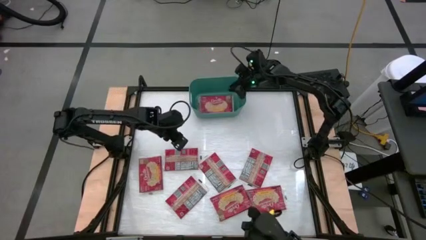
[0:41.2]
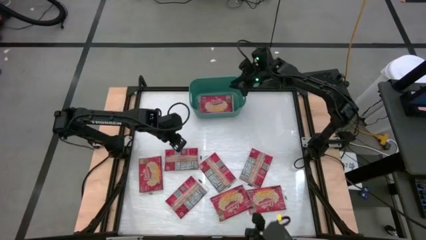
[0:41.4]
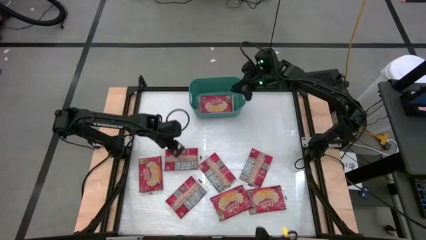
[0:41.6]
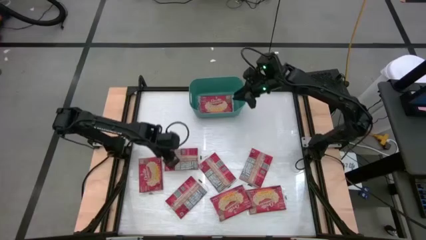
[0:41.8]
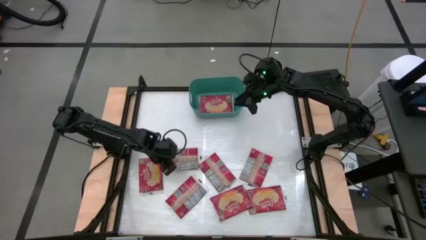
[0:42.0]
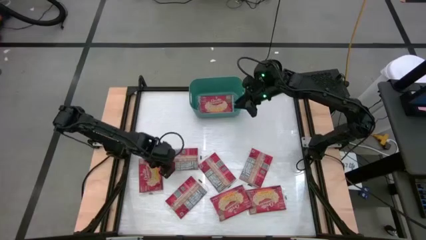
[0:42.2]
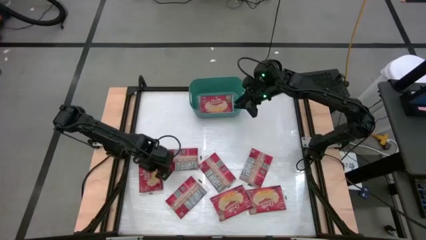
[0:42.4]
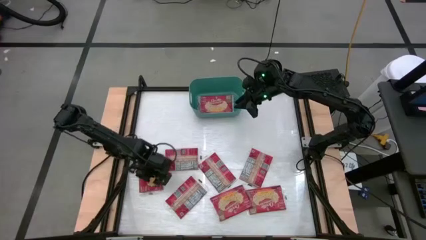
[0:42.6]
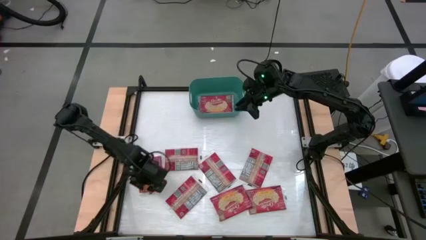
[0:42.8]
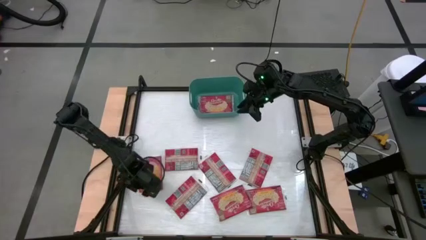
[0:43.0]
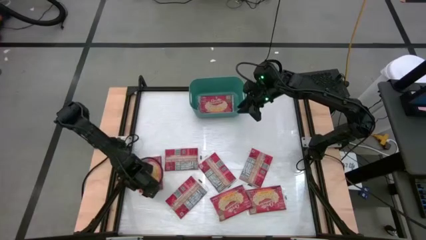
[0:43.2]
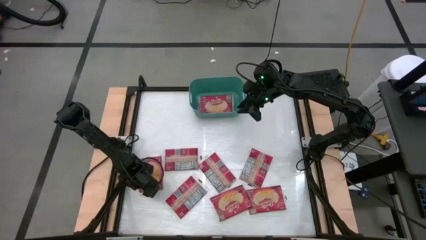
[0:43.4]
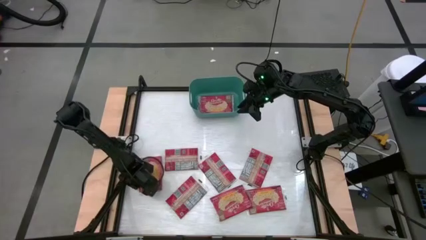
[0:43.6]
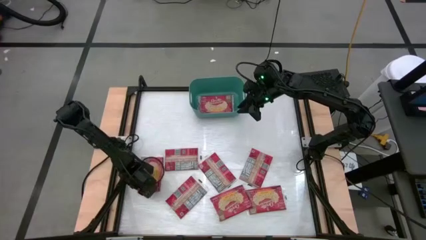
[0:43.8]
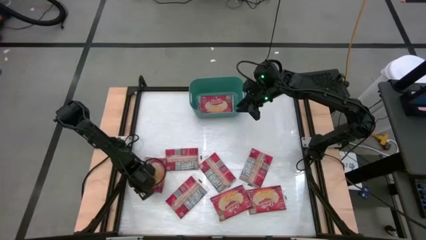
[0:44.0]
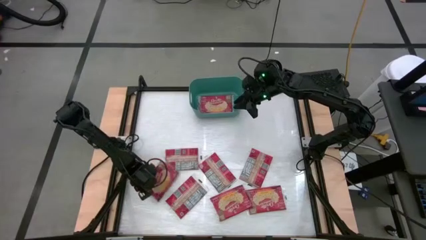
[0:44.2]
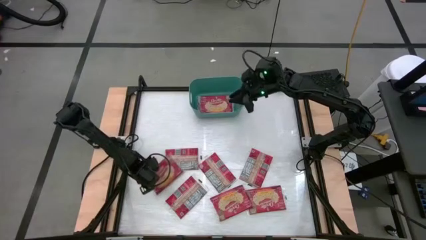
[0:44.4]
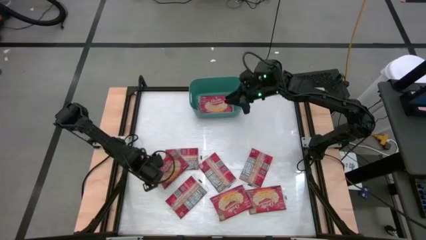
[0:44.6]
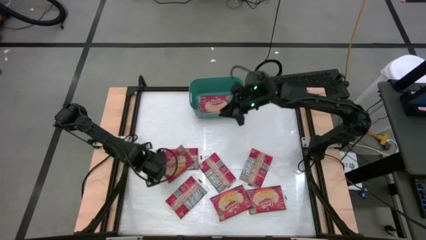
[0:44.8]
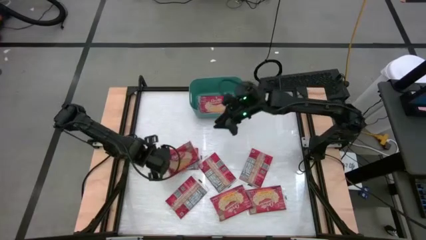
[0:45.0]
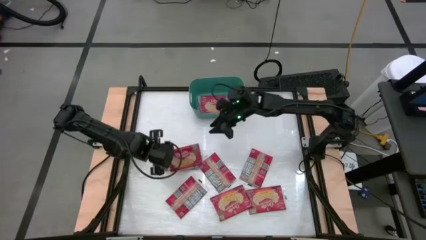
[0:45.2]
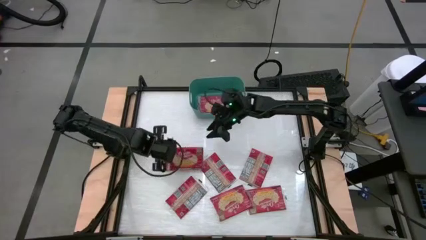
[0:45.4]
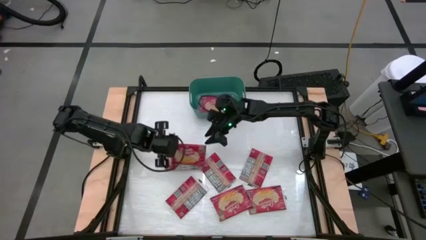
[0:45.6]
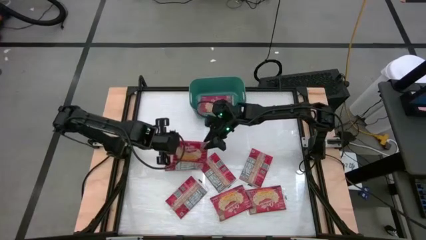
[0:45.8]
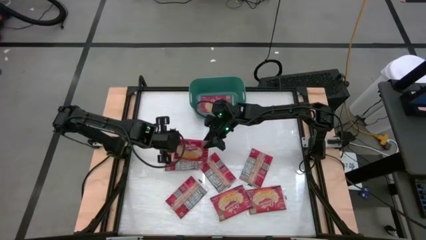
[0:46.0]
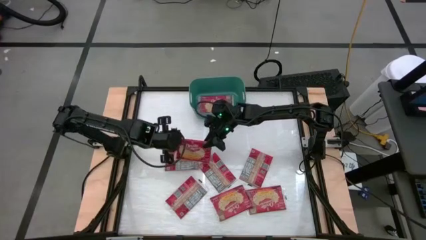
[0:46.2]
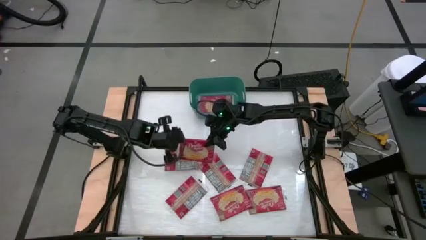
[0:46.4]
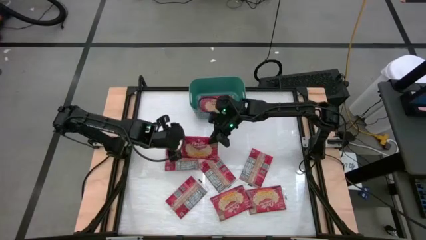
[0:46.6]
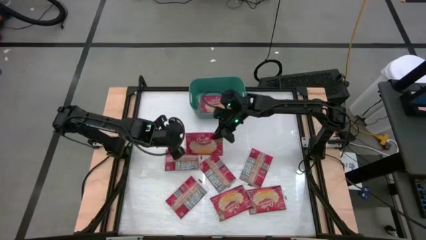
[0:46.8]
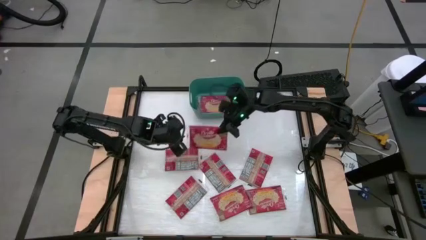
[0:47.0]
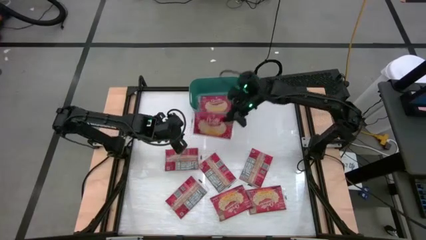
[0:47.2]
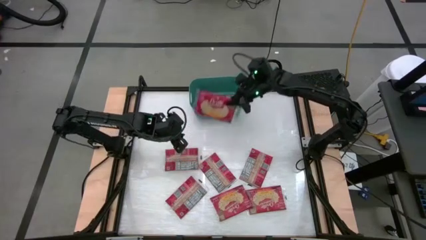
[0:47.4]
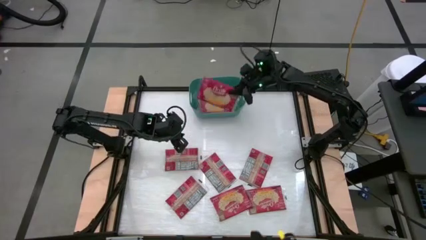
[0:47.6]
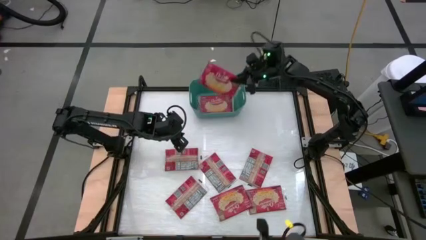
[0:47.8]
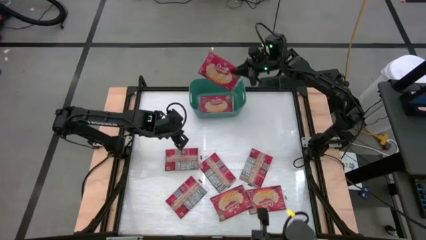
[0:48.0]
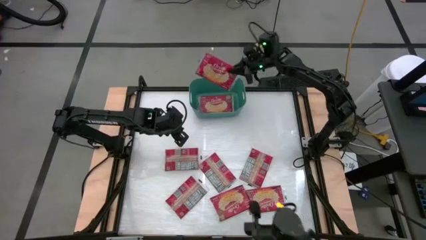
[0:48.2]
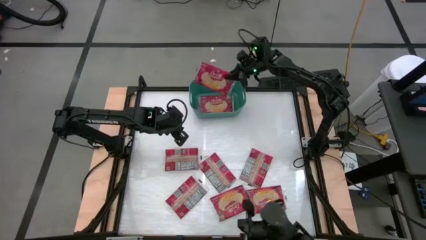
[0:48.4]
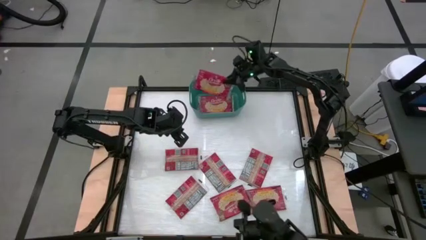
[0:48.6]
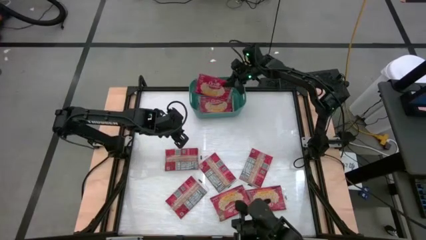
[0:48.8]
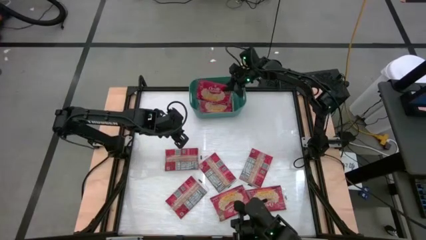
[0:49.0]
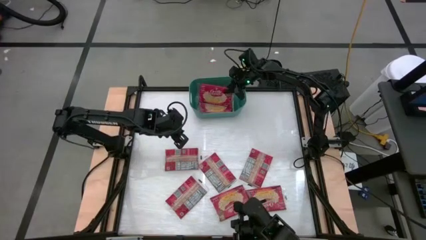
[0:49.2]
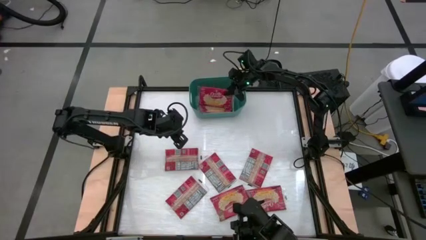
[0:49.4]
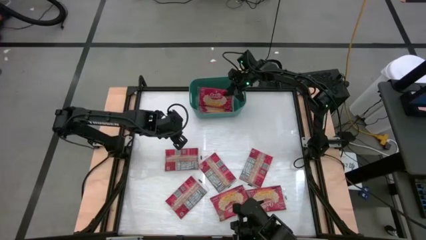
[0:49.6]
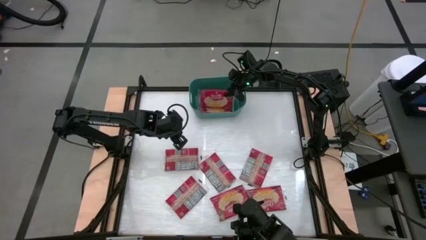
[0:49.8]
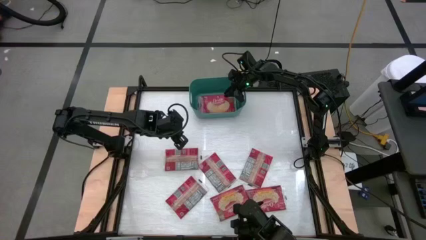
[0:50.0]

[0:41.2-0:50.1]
Task: Sort popcorn bags into baskets
Put the red popcorn pack into the green bin

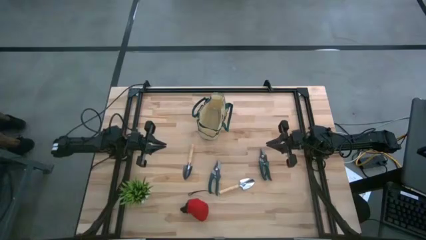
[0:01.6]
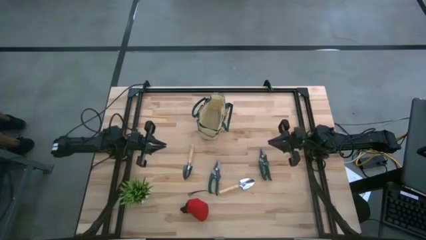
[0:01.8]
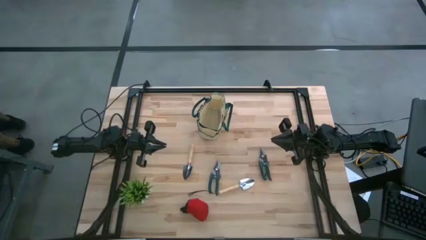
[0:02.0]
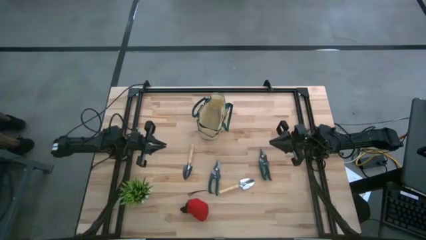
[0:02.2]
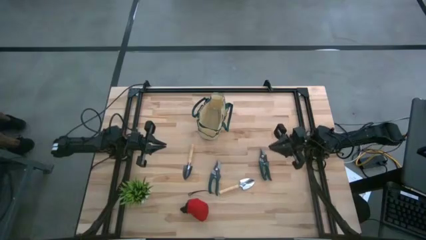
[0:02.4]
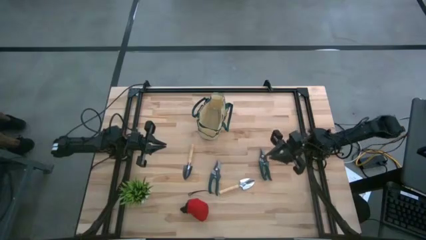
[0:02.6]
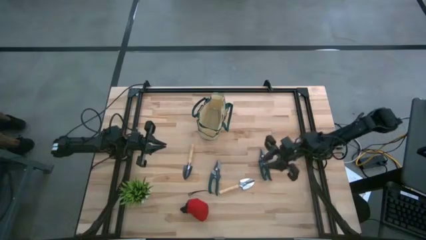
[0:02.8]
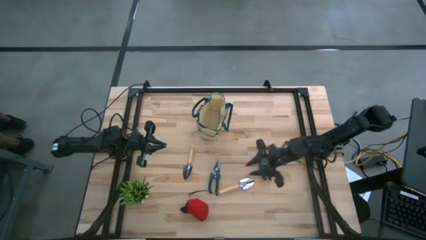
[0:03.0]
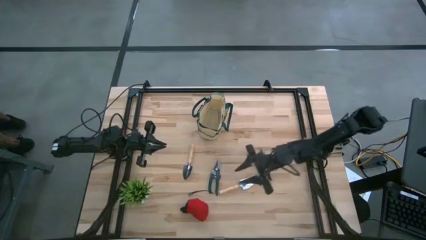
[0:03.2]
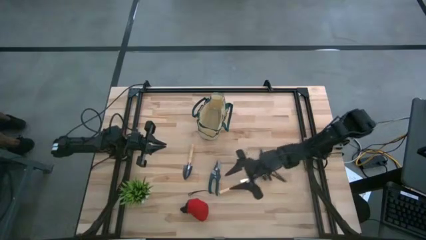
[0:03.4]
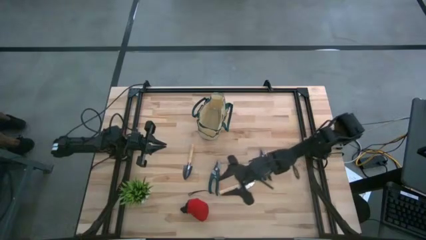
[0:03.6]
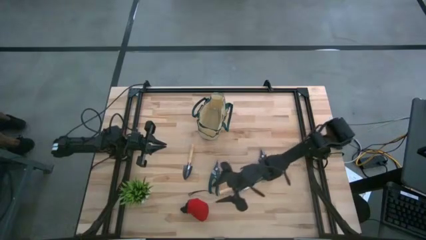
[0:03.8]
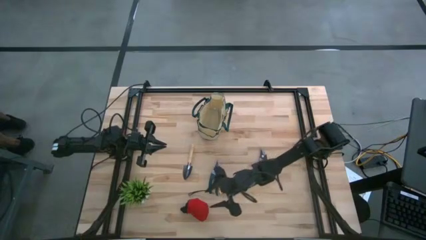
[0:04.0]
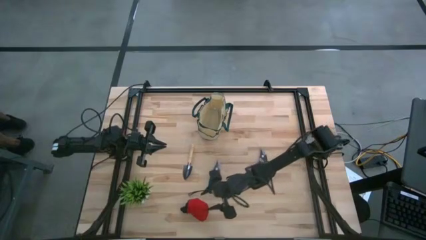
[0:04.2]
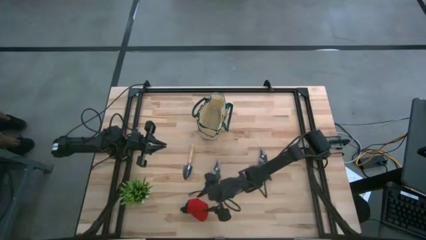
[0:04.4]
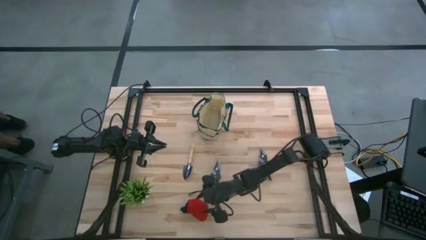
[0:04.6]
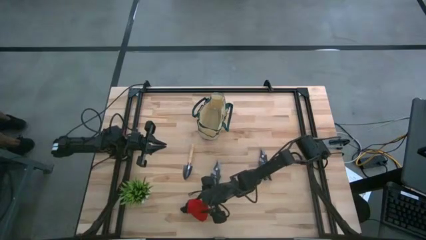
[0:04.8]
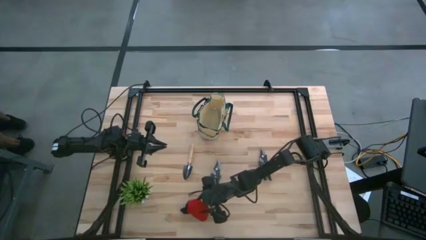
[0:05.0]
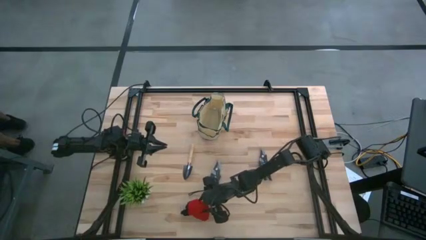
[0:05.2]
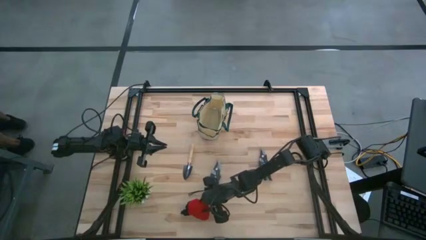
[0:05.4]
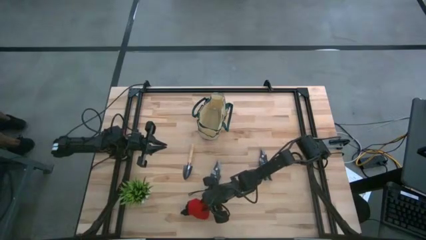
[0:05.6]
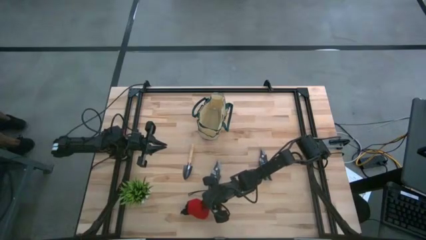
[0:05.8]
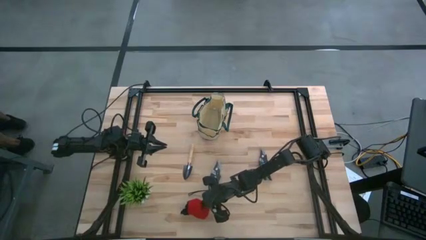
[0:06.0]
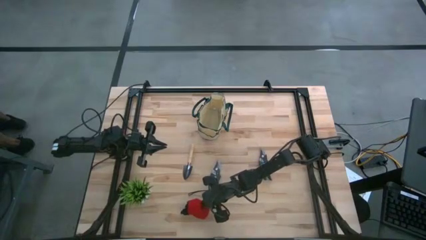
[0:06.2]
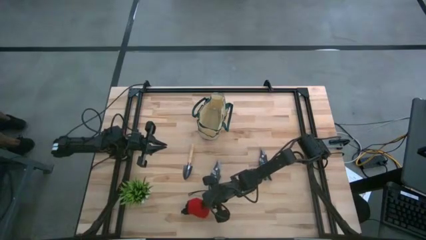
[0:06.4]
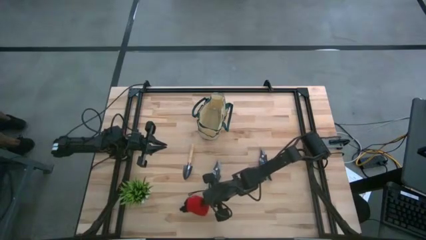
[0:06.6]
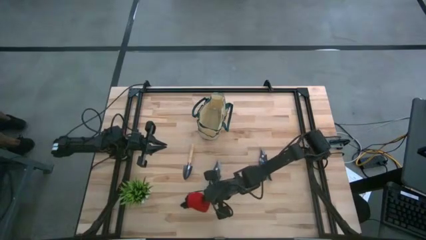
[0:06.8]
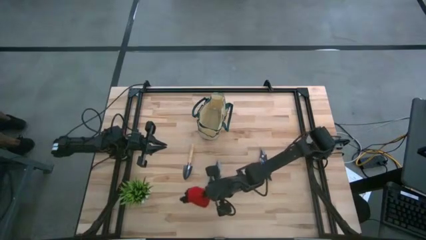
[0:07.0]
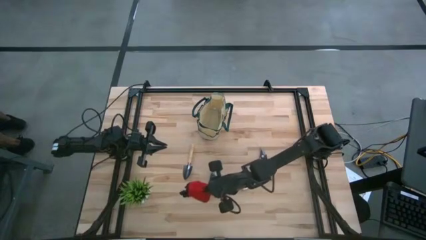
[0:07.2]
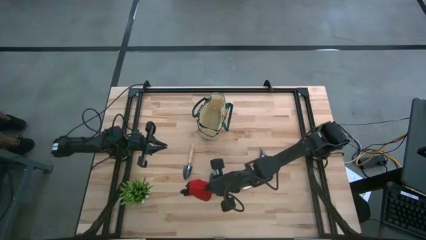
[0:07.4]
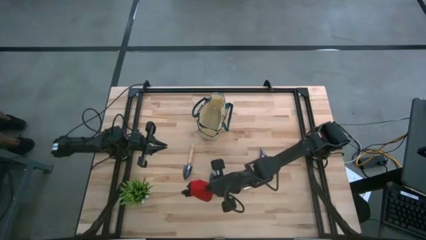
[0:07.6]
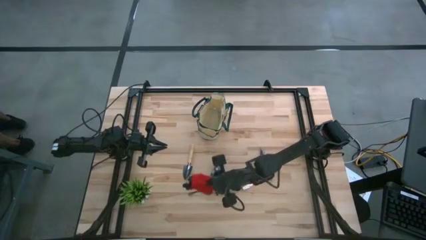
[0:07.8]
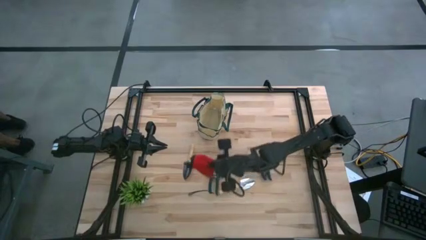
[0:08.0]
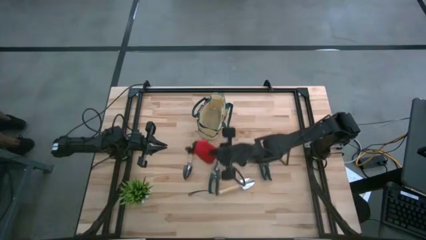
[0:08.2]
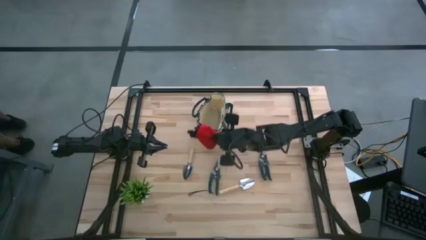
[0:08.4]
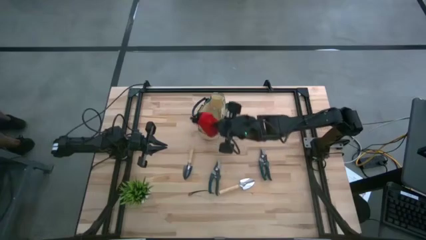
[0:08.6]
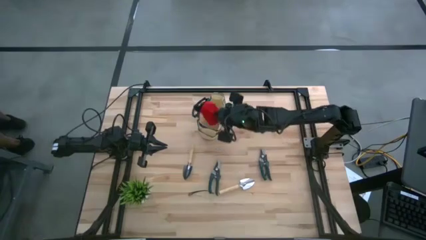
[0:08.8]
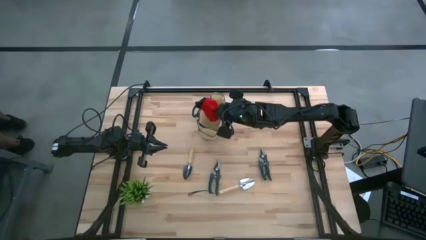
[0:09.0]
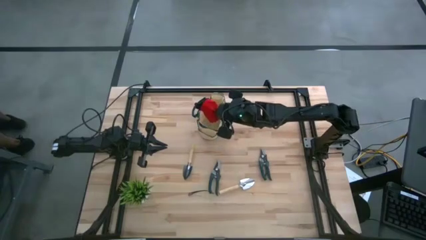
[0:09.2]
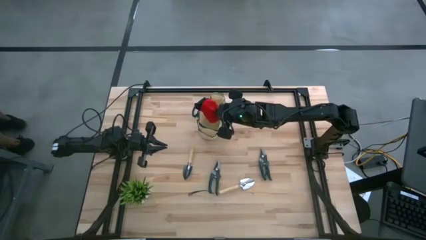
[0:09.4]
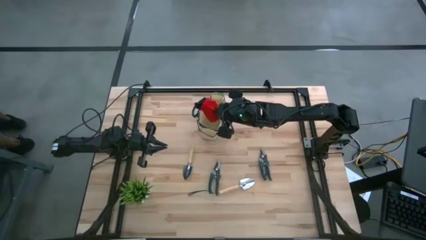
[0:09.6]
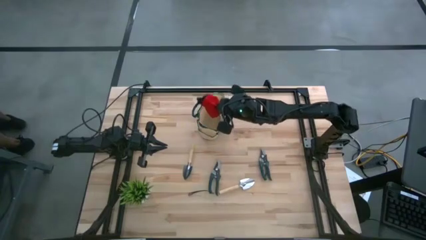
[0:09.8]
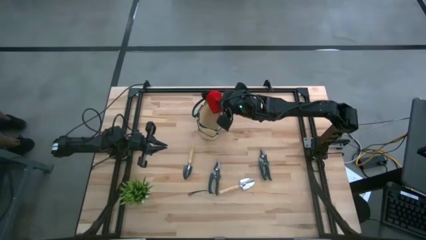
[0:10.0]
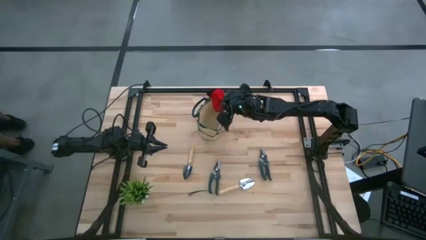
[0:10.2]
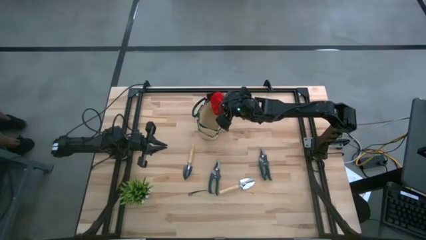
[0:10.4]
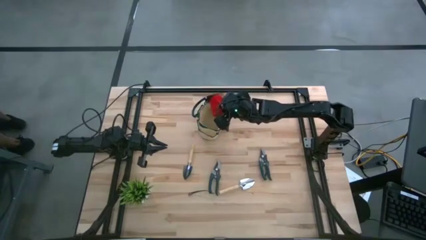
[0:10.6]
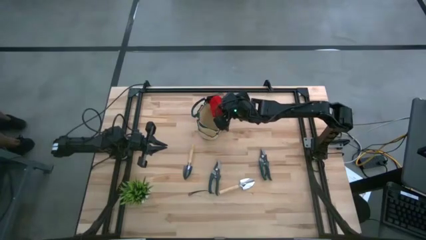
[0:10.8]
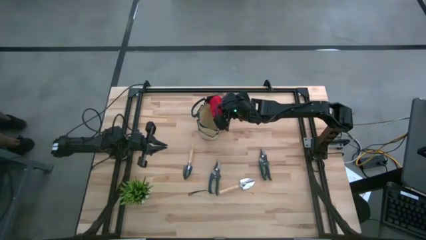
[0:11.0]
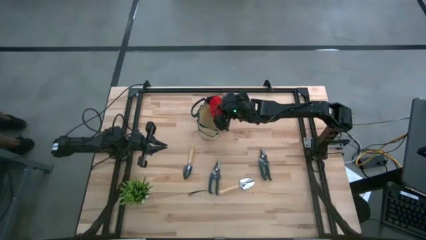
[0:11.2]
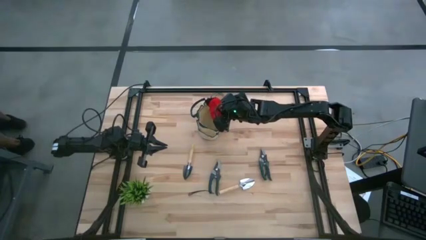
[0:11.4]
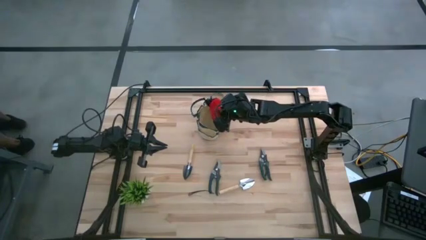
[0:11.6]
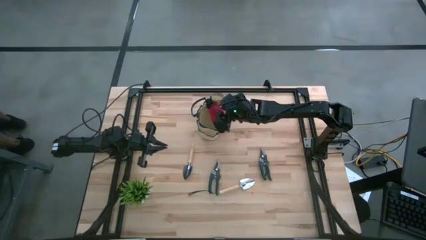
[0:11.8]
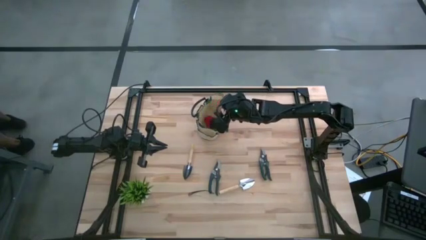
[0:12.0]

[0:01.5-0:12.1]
Task: Pick & Place Garden tools in Gardening bag
Put the gloves into the gardening bag
